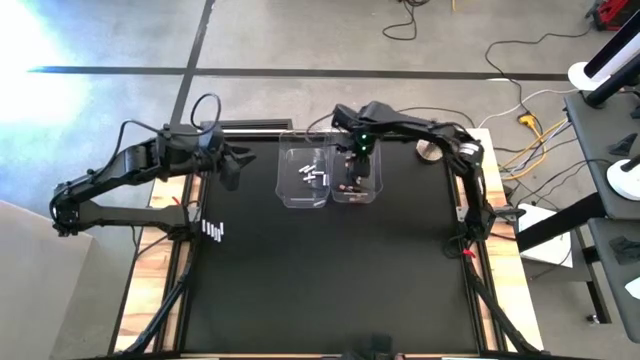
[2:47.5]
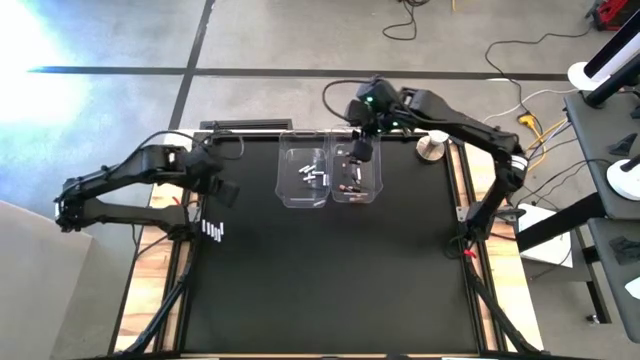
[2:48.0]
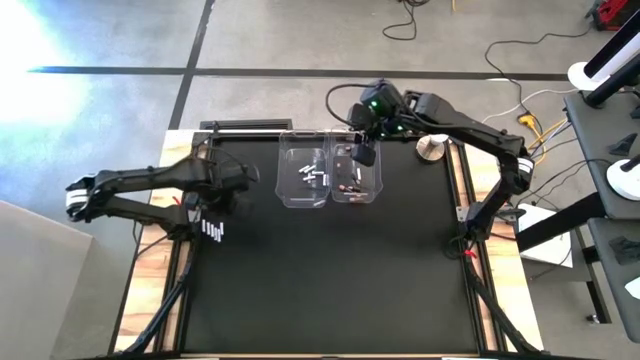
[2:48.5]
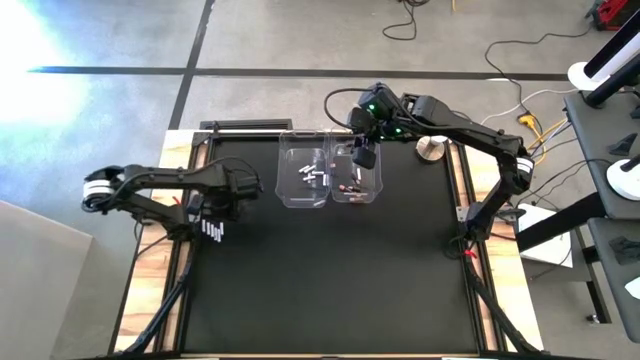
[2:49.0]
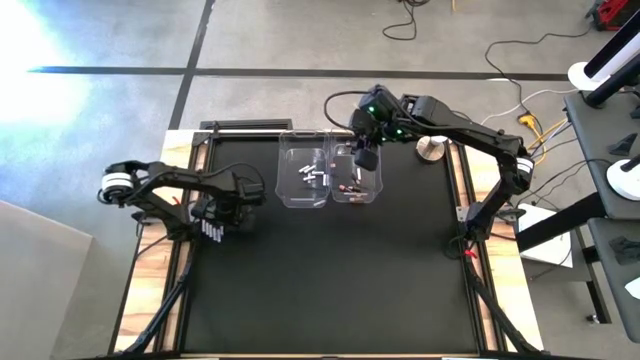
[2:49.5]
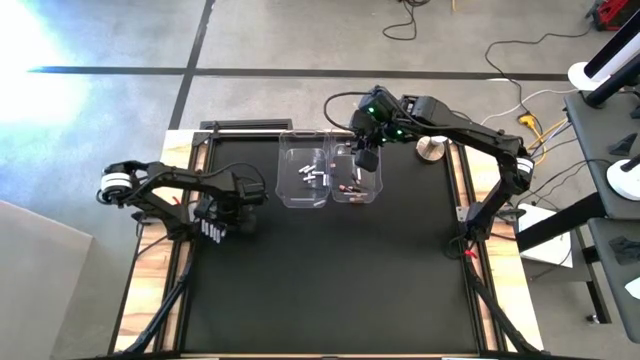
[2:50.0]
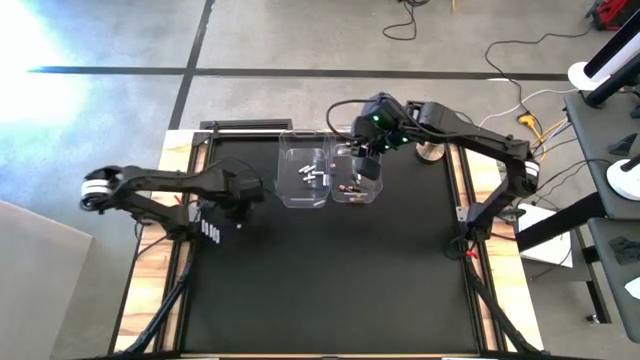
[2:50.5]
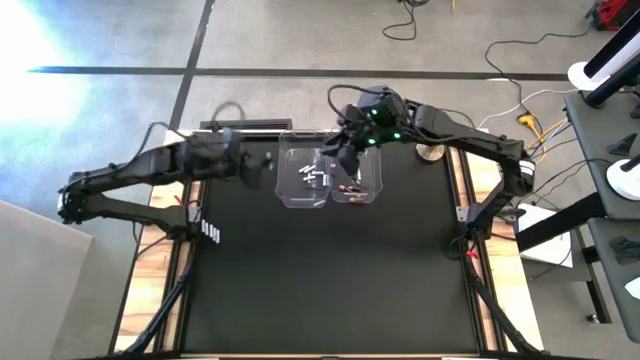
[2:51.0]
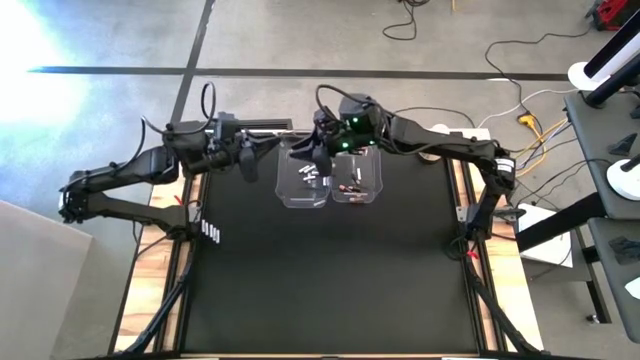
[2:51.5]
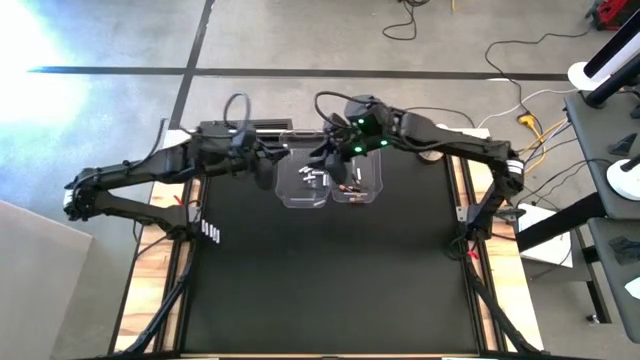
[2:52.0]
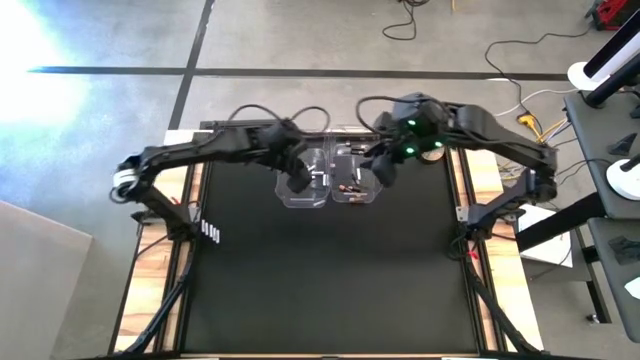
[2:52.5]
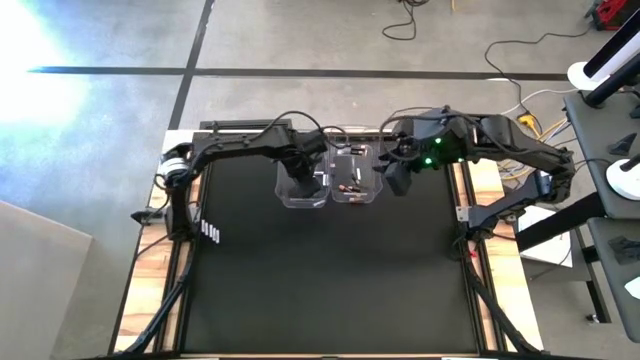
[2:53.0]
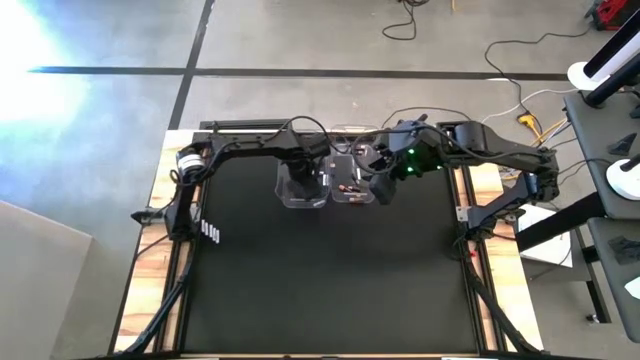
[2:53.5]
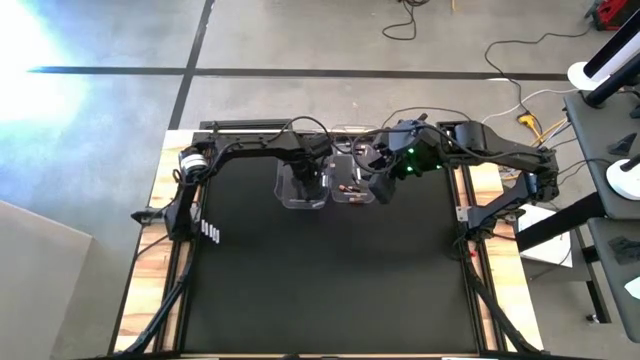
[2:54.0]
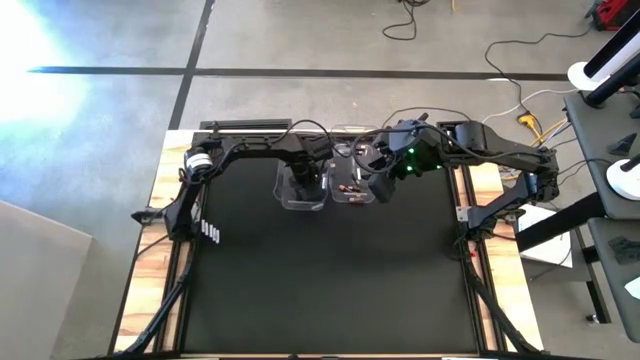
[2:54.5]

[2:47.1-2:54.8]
Task: Sort batteries
Put the white battery into the left transparent bin

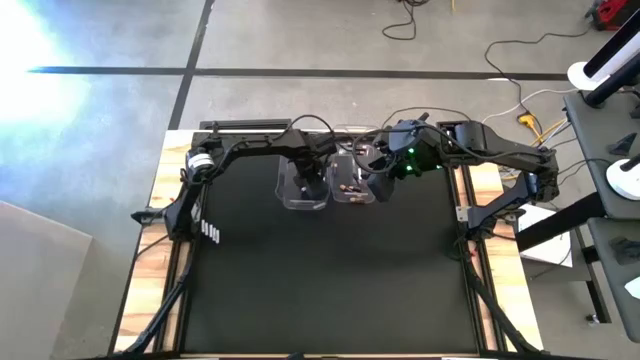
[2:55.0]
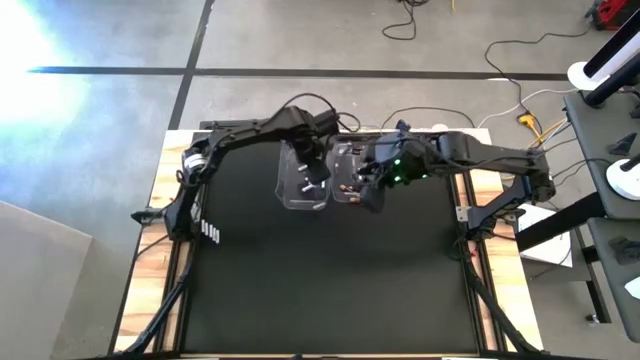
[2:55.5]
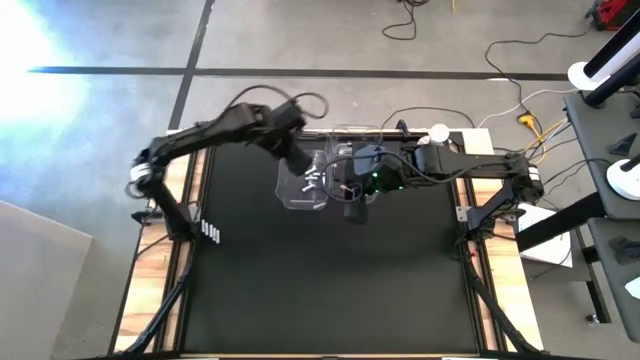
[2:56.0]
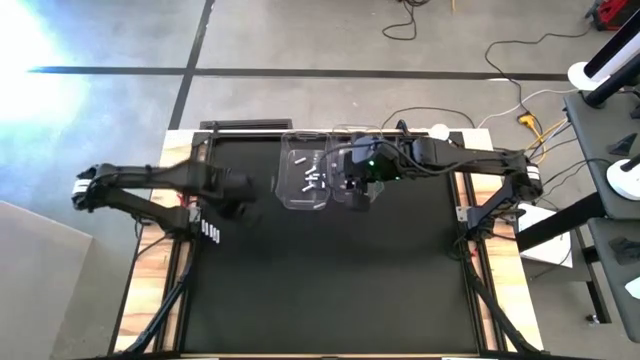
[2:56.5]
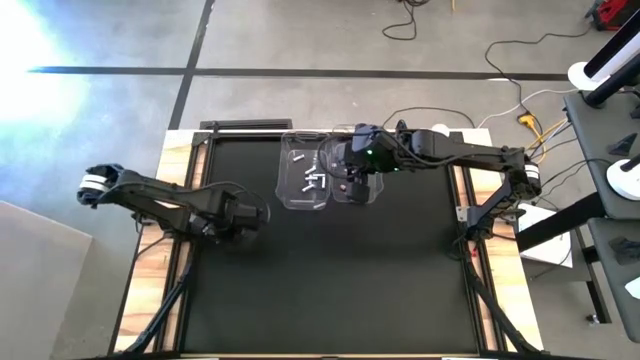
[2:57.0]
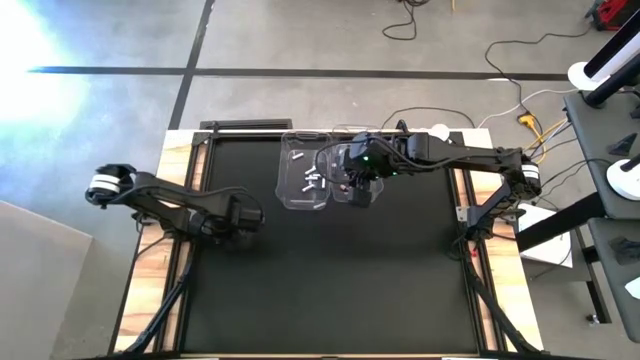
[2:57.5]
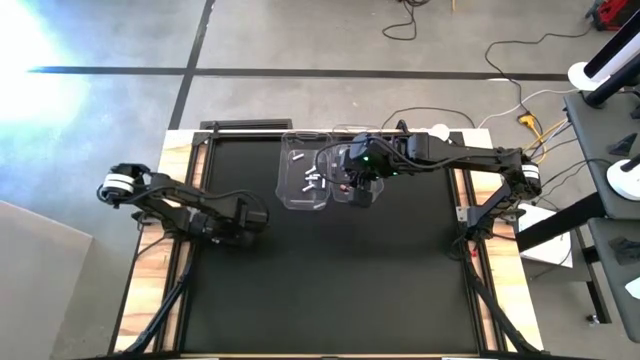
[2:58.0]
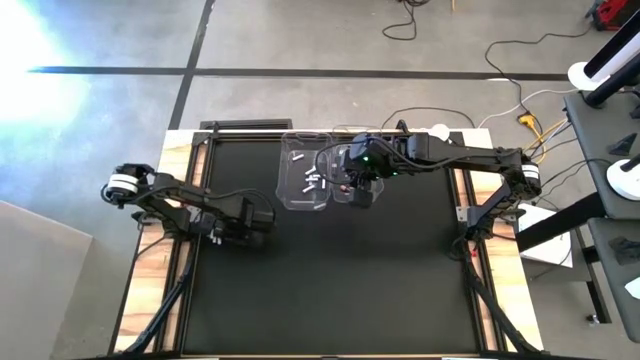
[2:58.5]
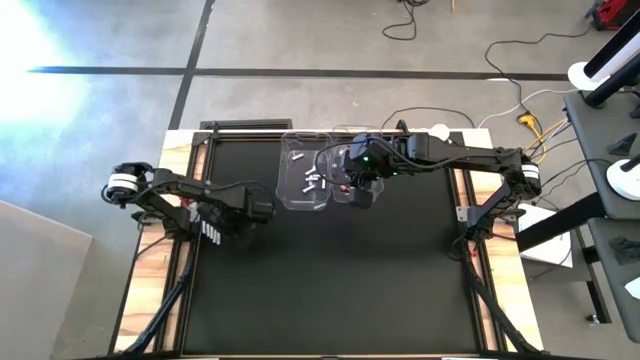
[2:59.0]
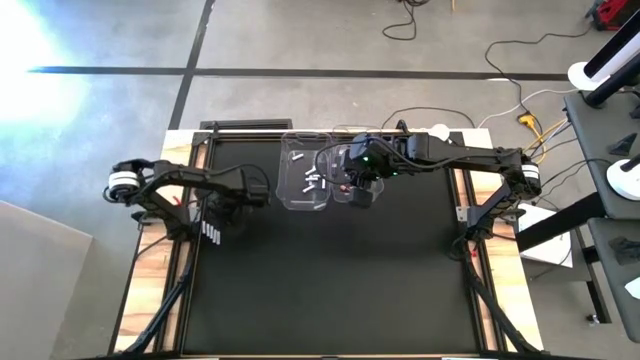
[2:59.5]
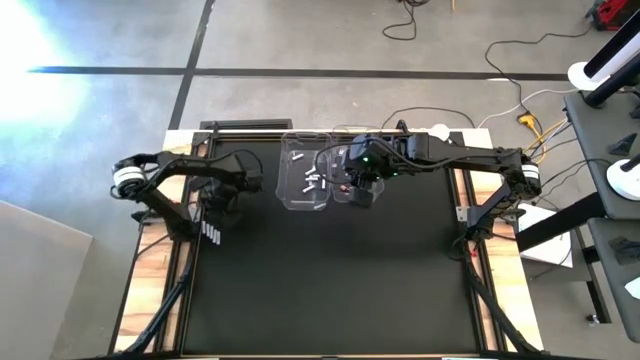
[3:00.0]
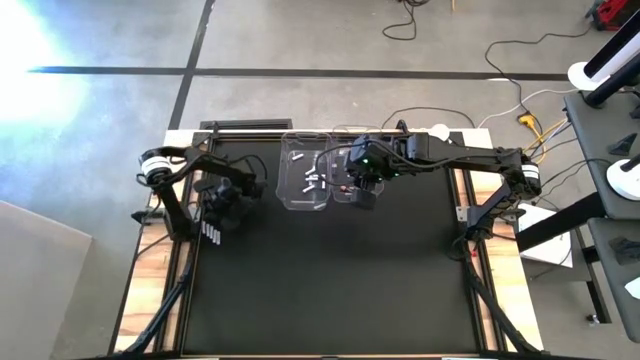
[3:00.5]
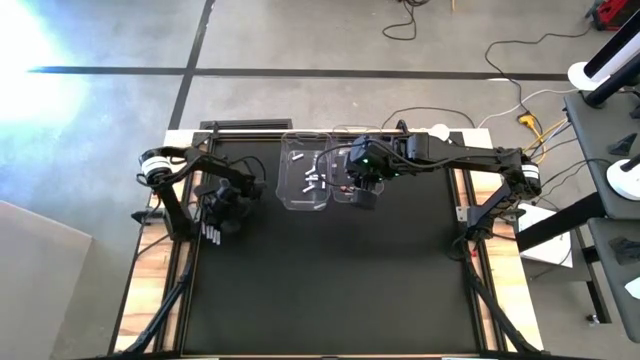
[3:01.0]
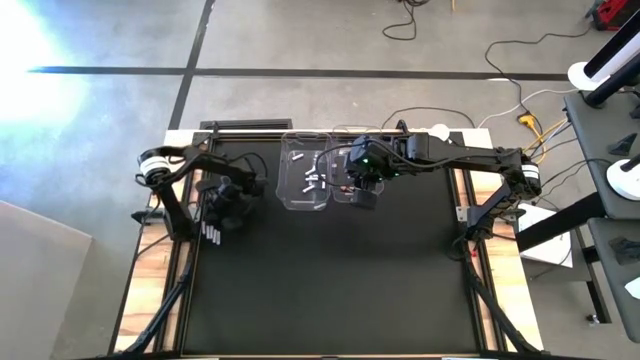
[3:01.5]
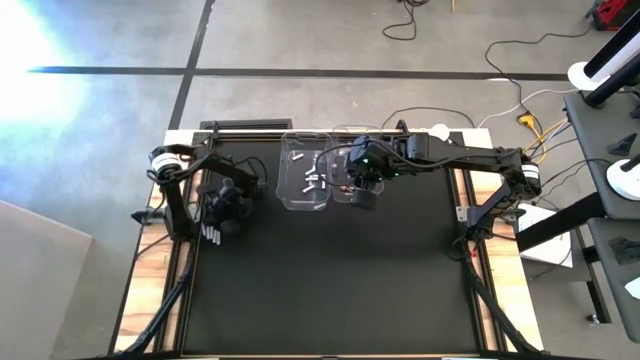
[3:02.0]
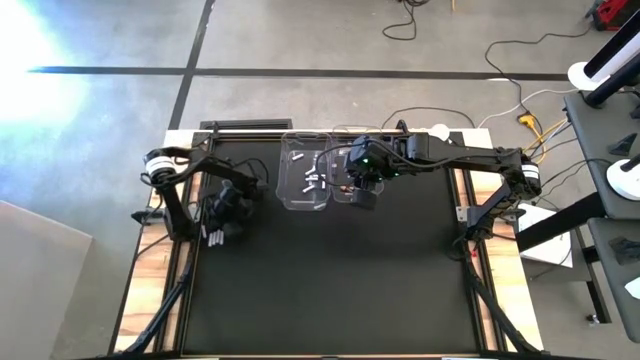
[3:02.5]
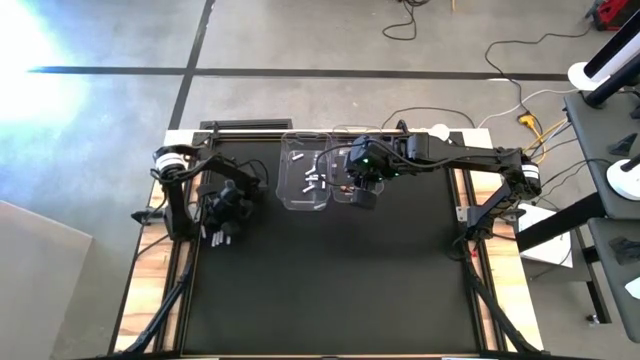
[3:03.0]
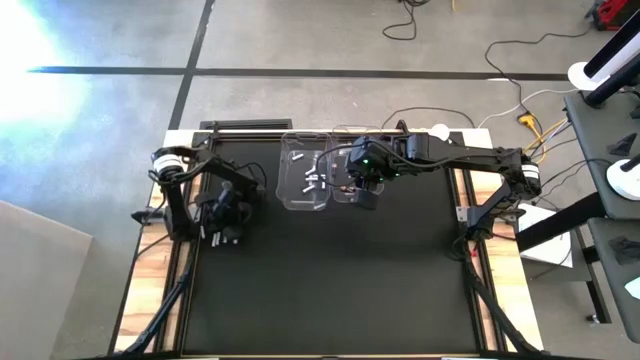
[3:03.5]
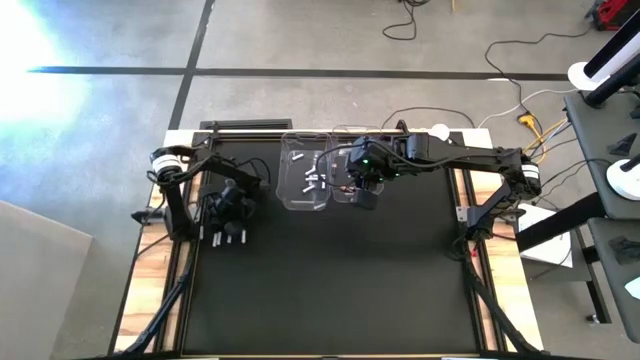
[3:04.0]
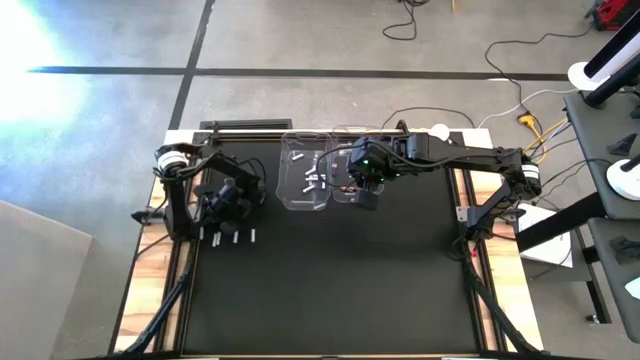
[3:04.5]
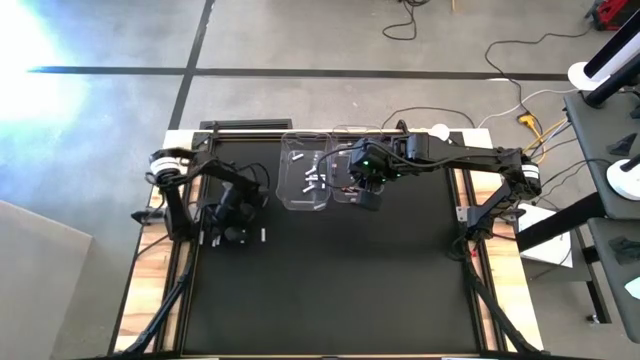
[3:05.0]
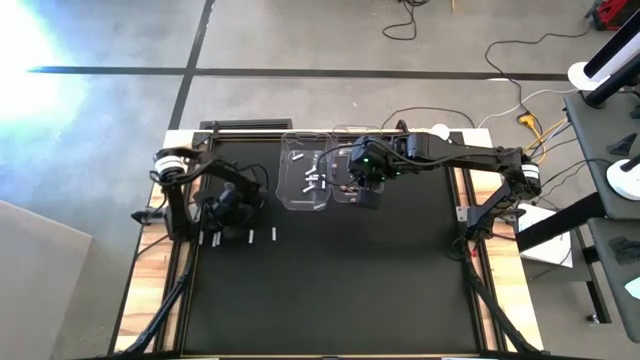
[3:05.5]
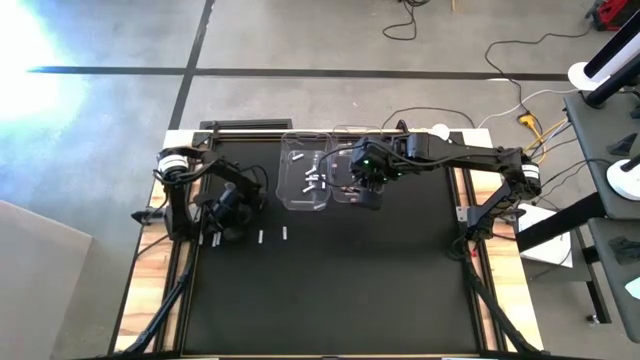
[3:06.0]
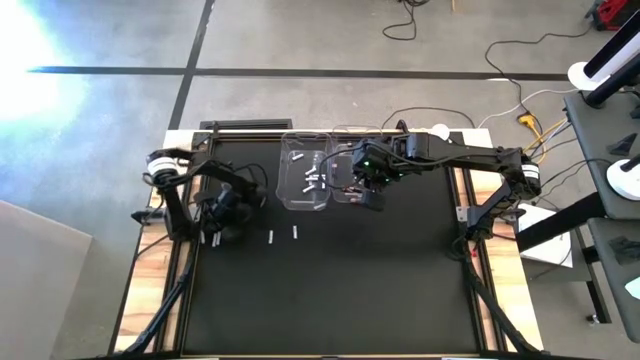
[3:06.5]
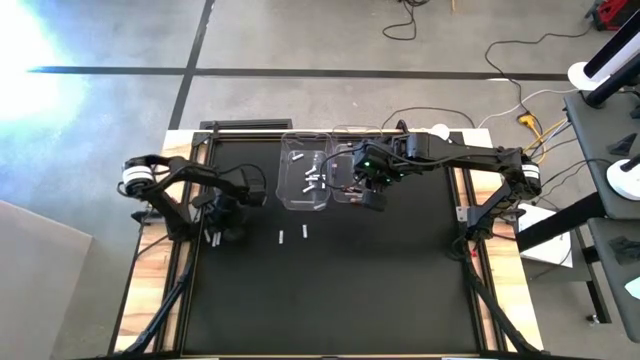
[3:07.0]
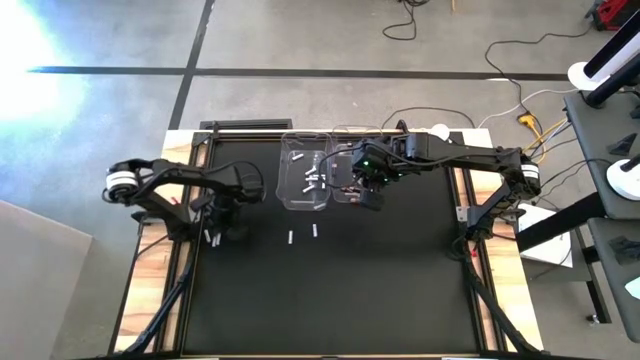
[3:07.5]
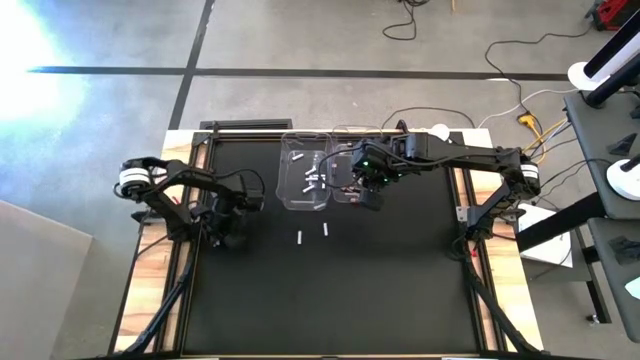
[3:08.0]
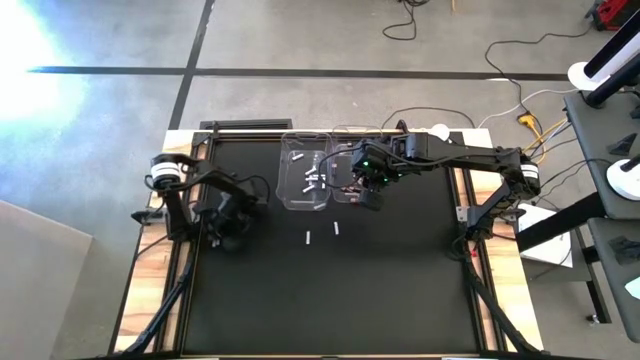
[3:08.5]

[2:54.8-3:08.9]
Adjust the batteries

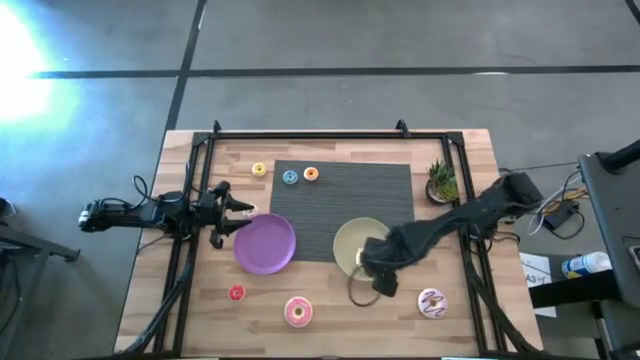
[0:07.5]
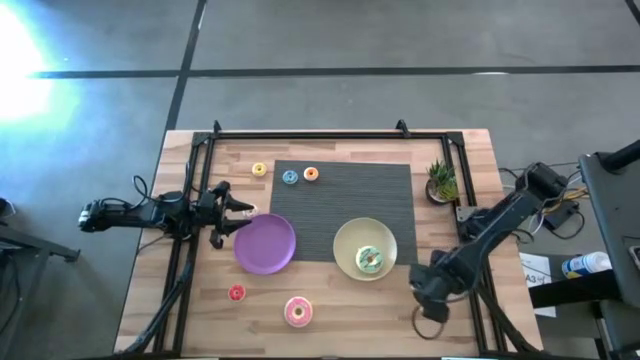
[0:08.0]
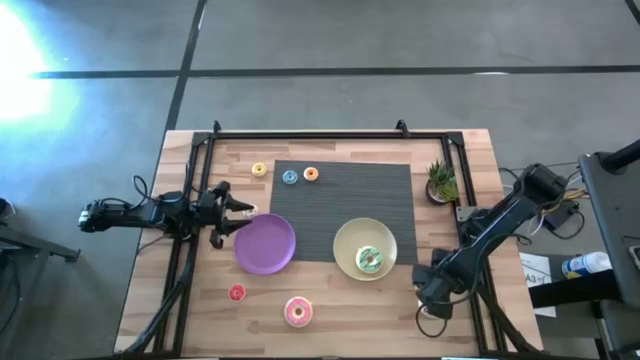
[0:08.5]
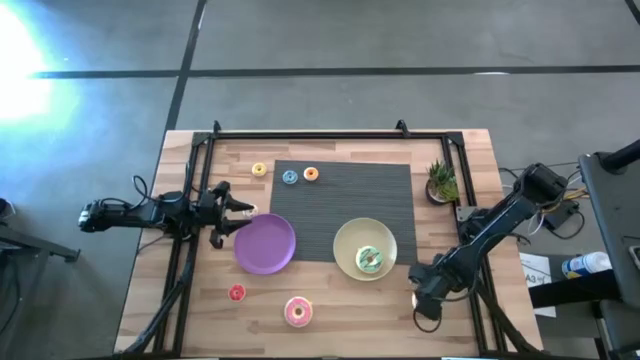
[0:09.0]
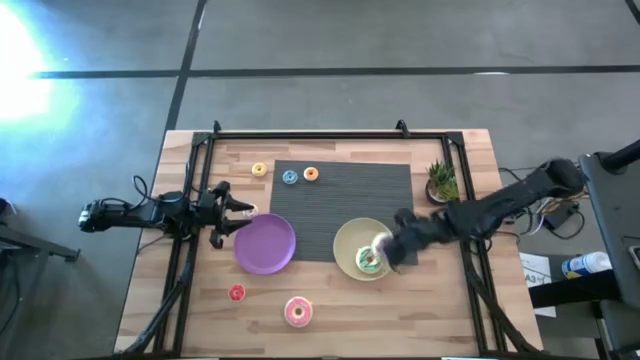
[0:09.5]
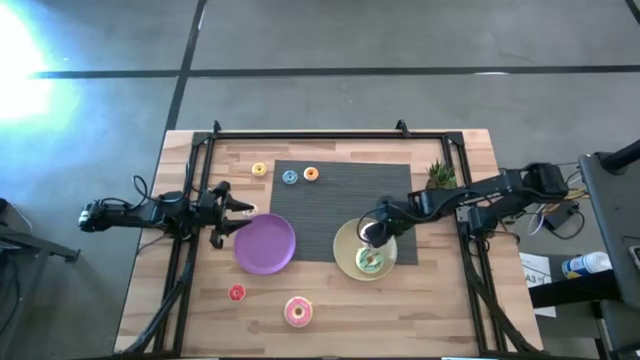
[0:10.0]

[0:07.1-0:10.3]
Task: Pick & Place donuts
Put the large purple donut on the brown plate
